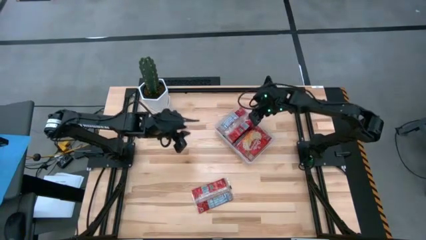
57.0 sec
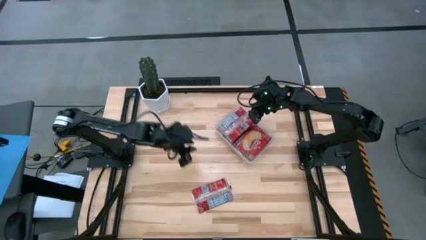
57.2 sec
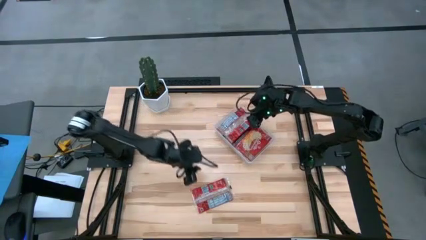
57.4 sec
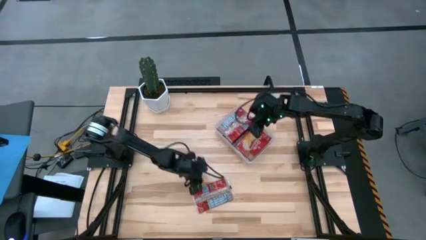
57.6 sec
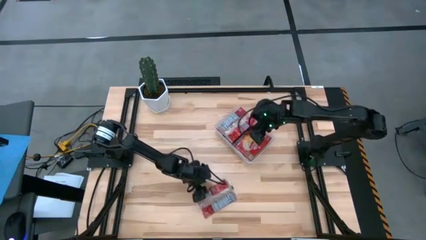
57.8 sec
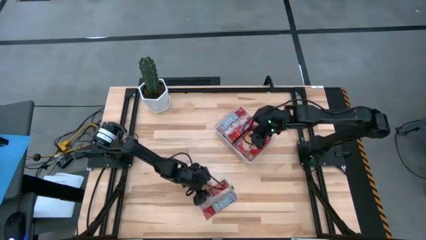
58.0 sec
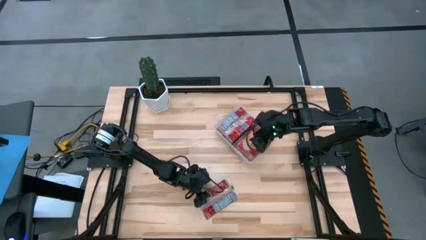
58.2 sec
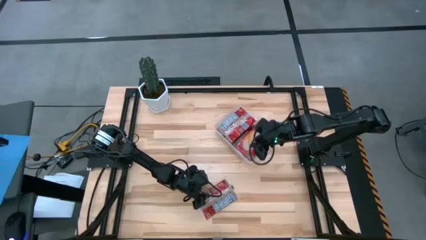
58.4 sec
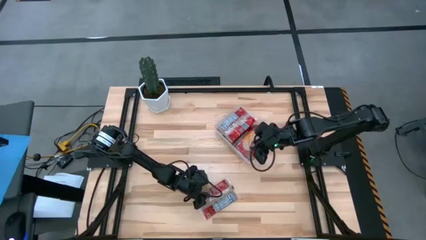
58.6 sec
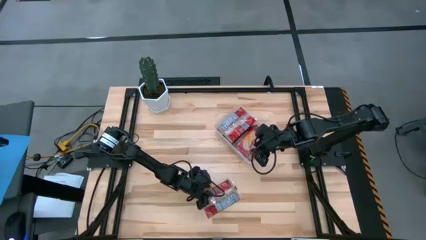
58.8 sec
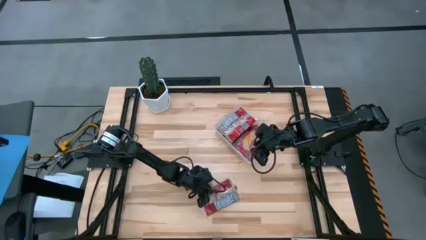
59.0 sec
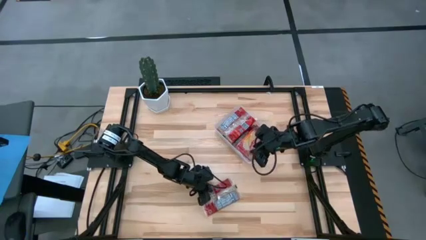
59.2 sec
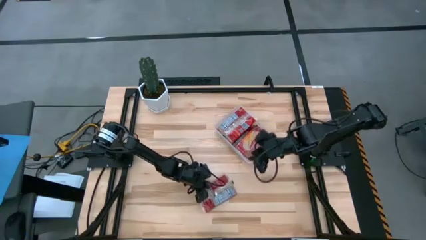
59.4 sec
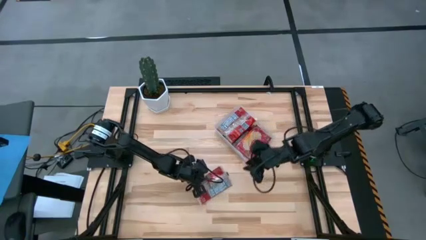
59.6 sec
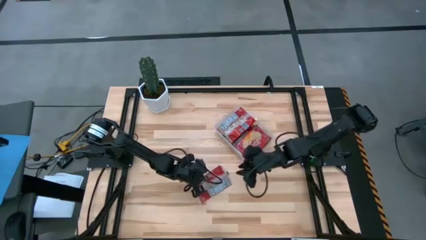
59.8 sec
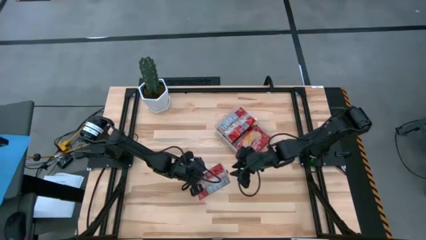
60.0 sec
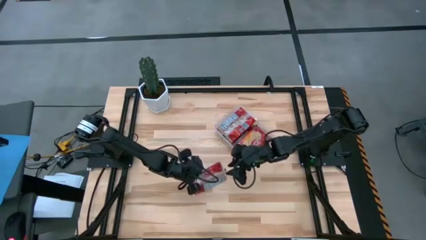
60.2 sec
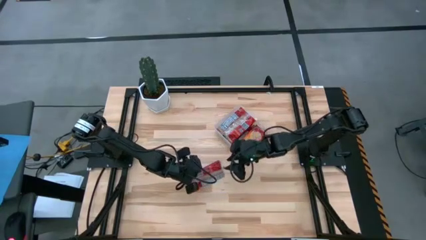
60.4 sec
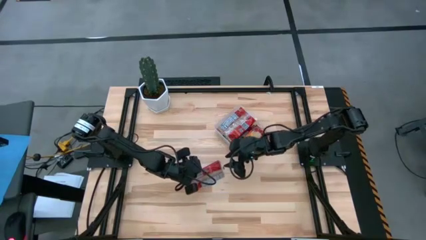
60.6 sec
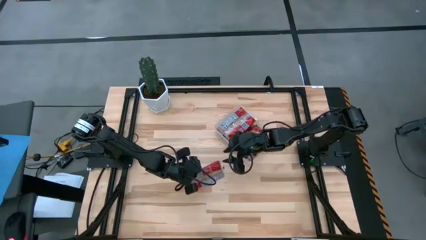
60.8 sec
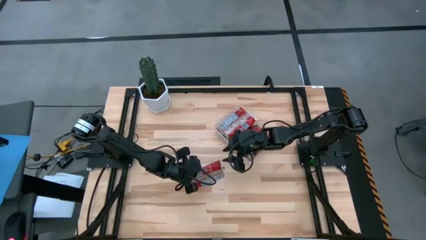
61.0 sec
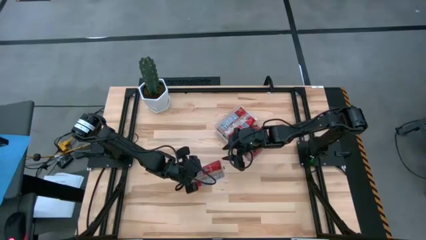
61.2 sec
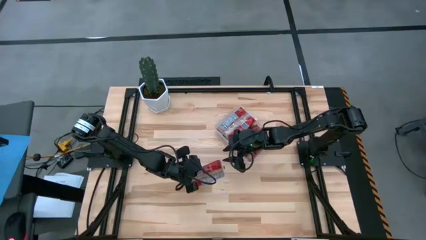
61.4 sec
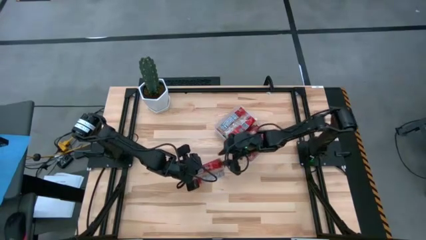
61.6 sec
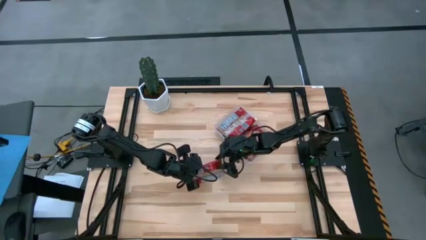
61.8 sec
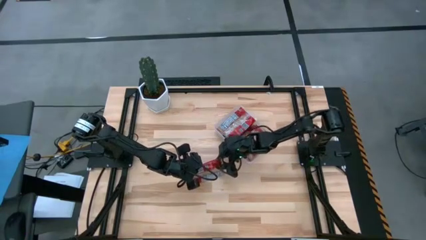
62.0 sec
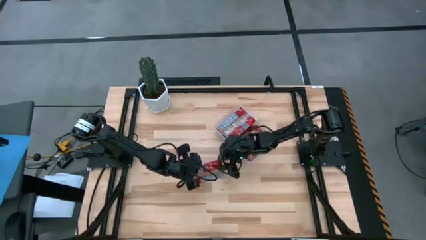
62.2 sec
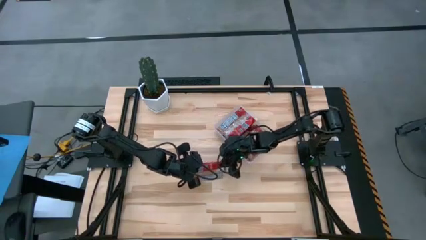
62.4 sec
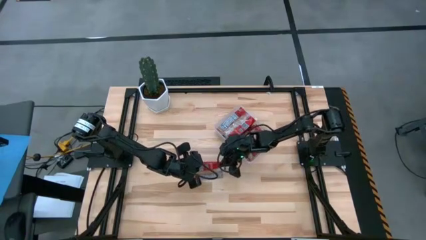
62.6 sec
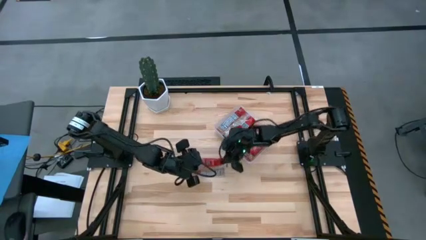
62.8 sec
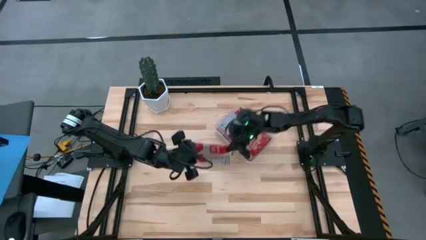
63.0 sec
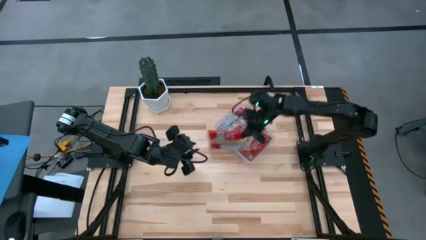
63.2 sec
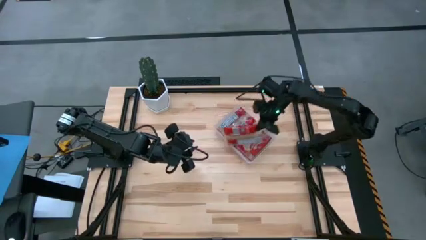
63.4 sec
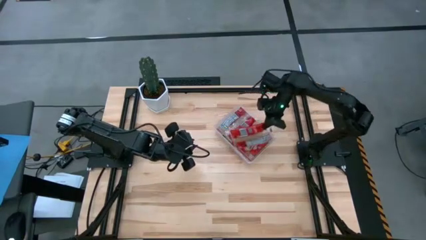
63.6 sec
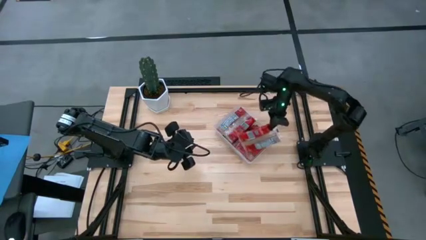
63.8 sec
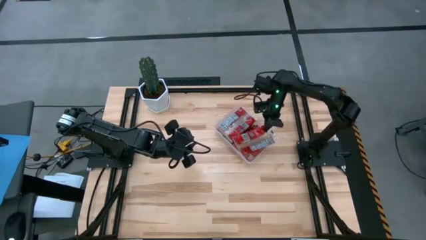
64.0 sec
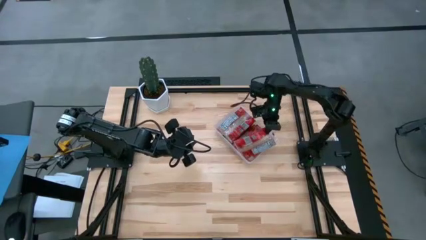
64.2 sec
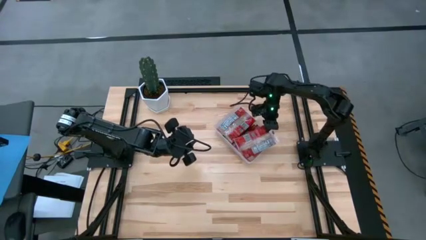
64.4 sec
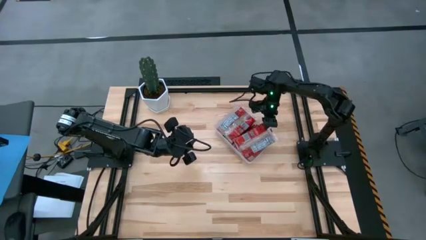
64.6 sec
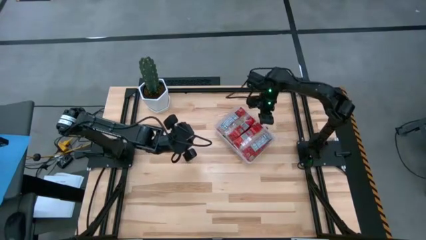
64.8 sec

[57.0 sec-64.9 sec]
Task: Sort popcorn bags into baskets
Put the red popcorn bag into the transparent bin

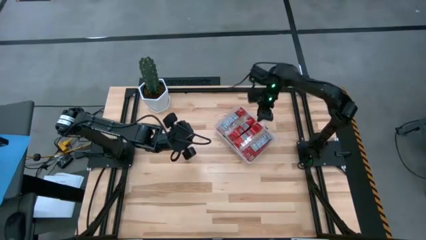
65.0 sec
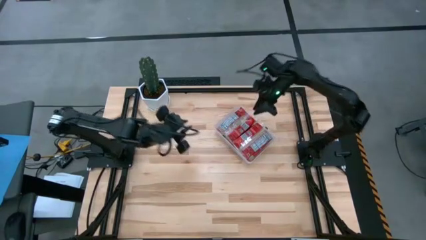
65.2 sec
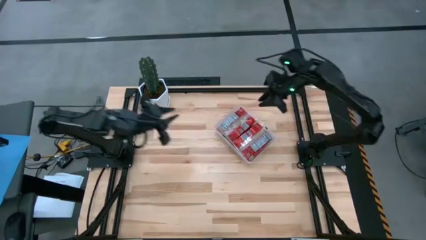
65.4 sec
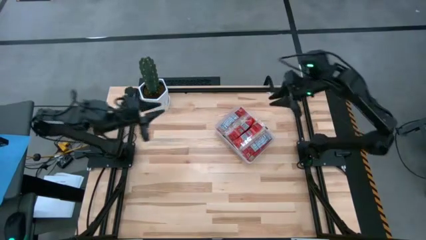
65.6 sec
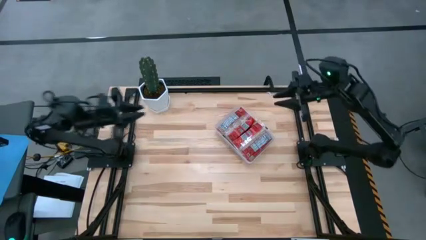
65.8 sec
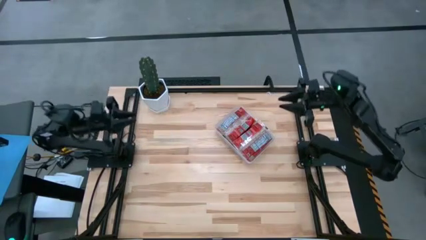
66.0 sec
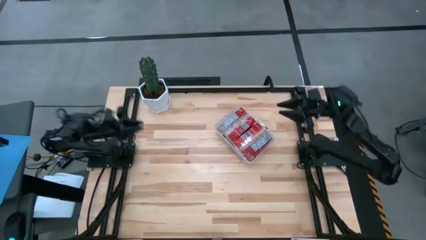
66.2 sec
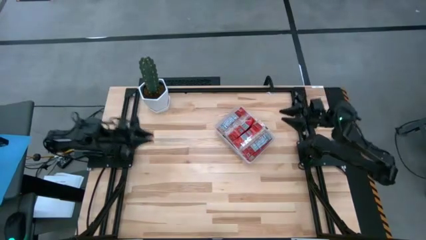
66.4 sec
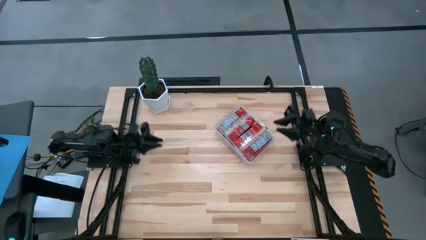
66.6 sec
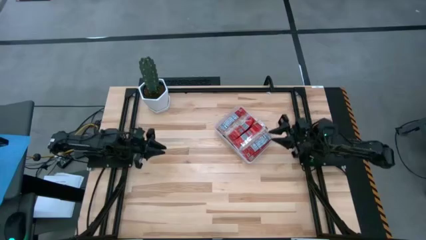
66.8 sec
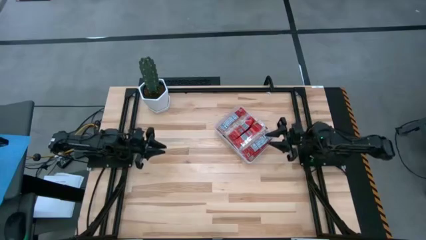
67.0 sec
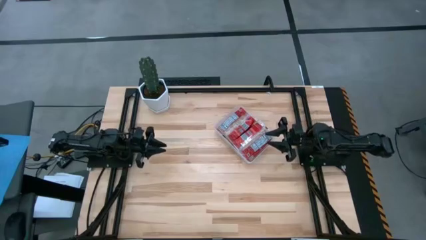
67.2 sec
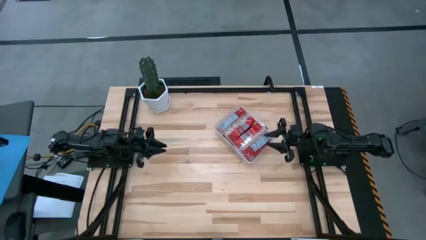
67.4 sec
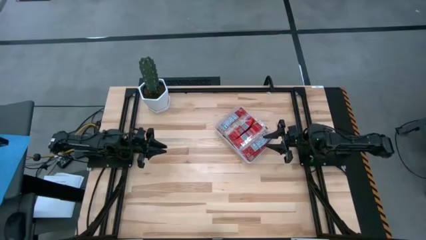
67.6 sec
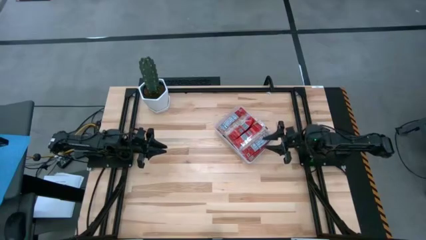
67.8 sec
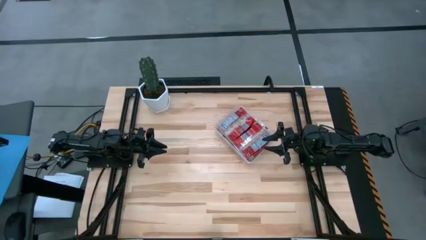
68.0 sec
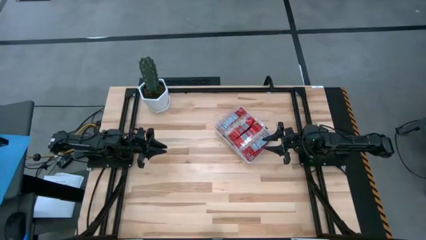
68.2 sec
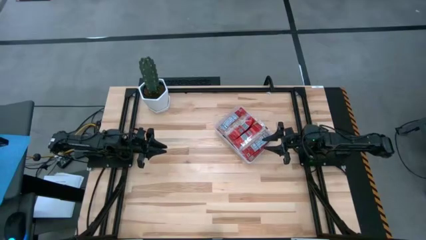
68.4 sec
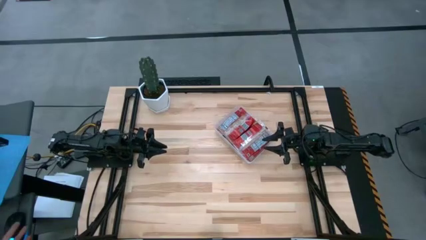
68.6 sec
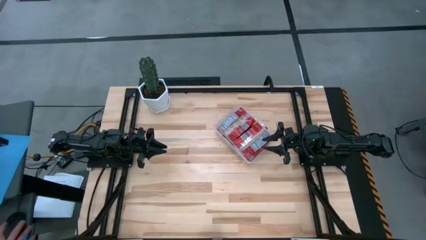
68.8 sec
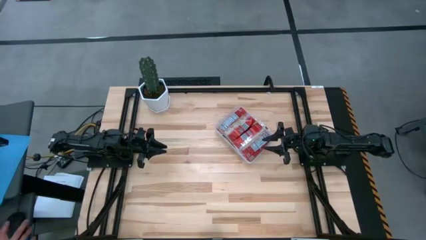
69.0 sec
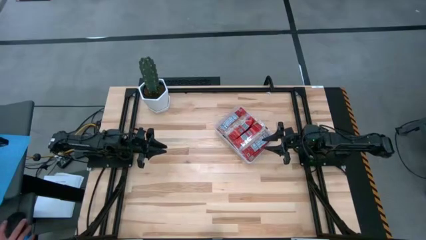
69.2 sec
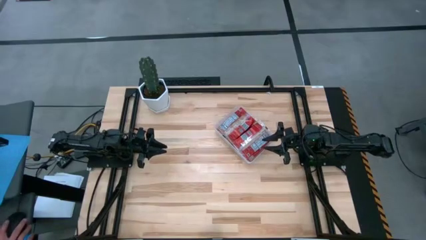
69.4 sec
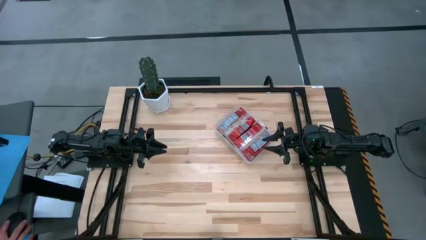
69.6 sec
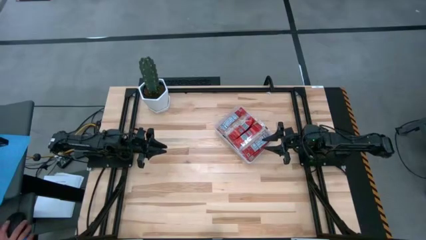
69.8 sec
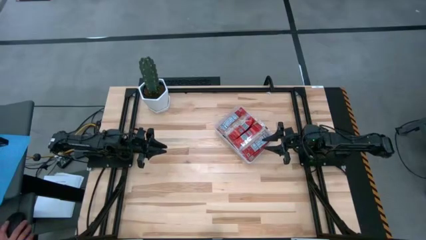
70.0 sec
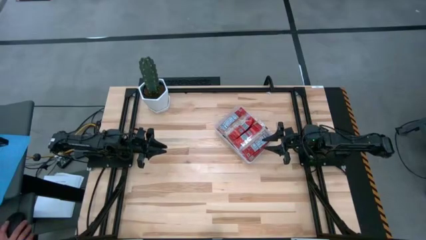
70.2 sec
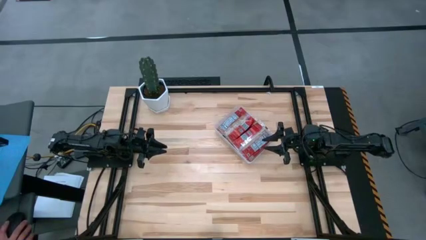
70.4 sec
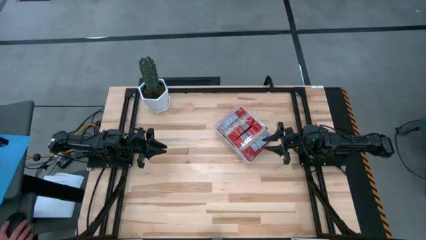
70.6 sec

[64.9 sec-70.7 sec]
Return to Home Position

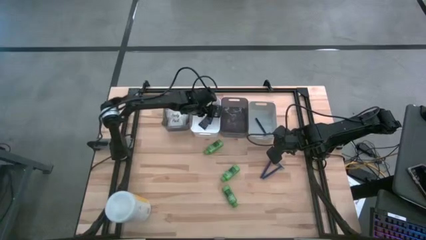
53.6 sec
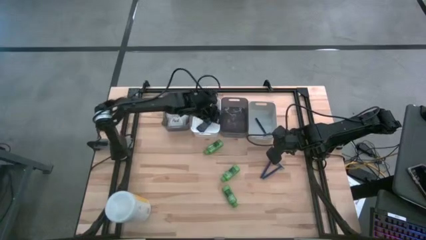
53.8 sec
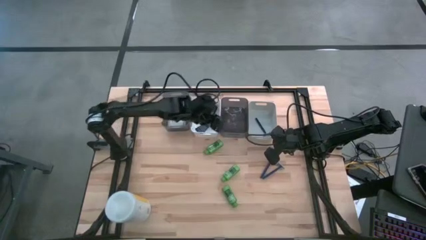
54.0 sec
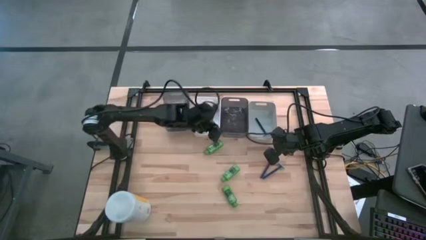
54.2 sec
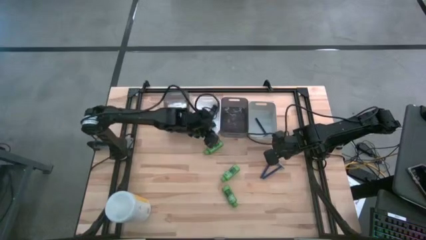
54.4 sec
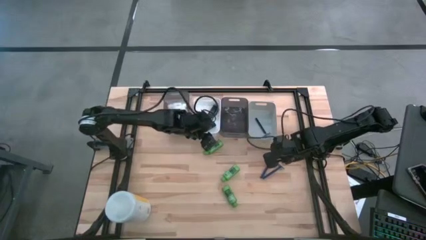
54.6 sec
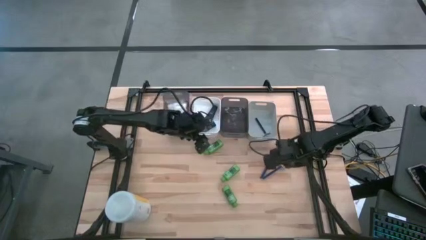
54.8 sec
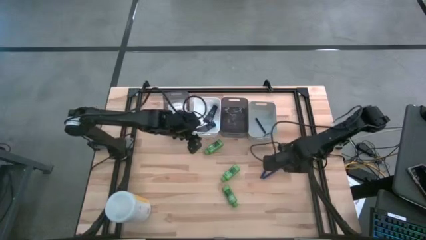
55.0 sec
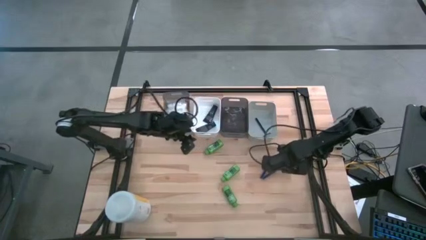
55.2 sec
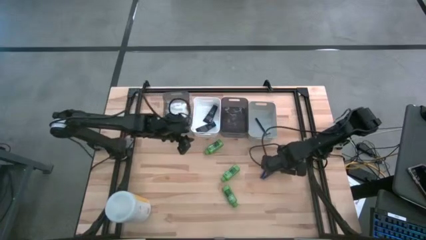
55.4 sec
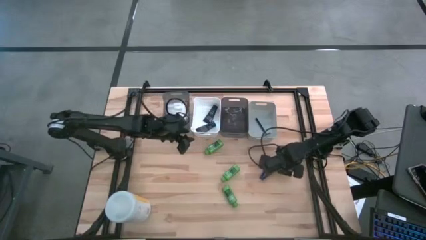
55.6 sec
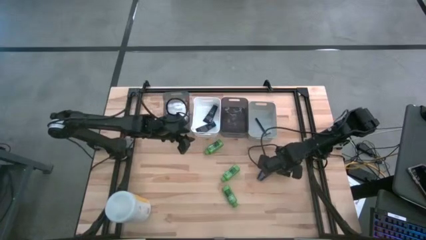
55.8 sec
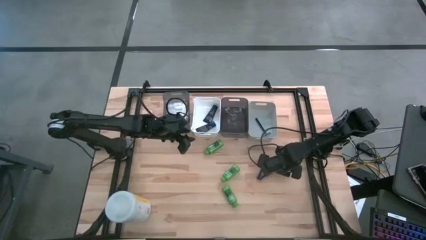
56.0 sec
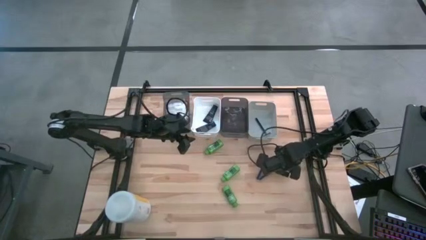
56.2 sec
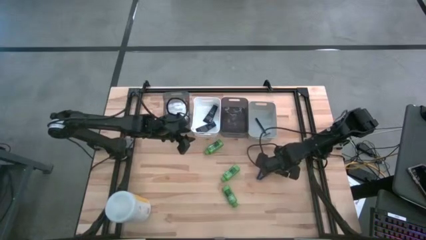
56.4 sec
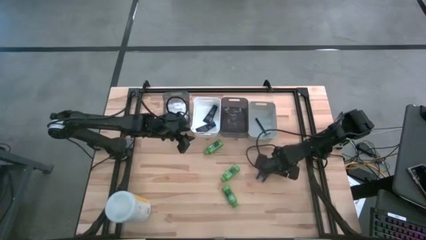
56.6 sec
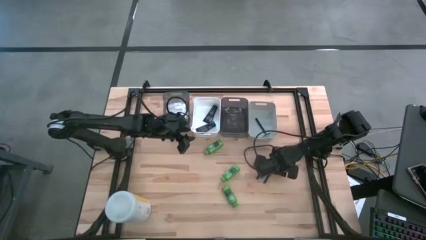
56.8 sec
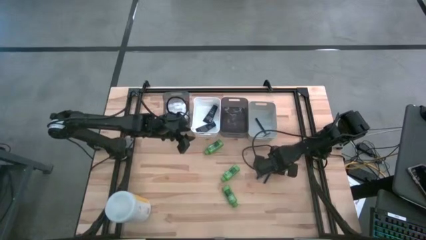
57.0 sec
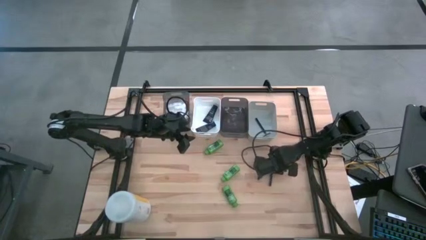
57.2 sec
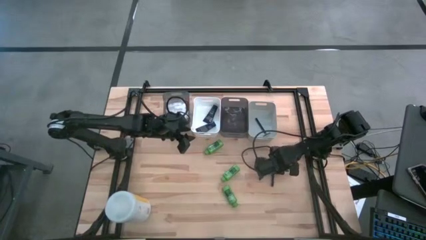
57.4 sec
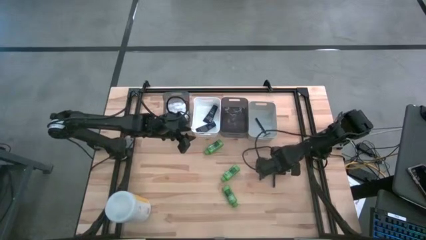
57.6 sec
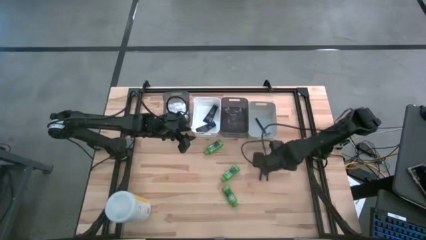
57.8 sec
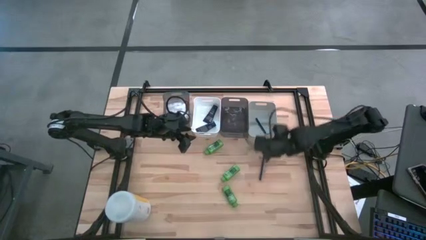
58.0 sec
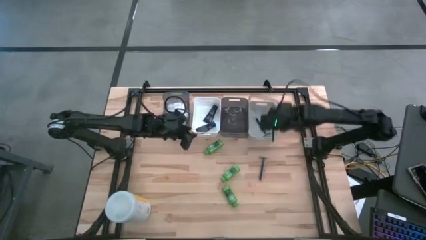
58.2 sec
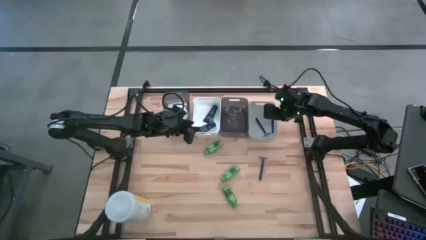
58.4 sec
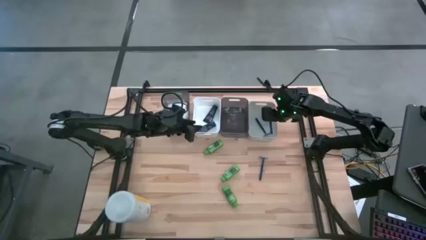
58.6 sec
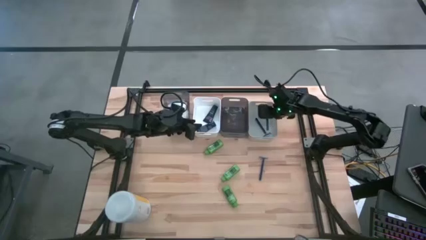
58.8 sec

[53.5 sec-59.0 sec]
Task: Pick & Place Travel size toiletries
Put the right razor into the gray bin
